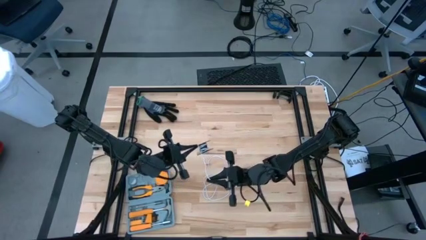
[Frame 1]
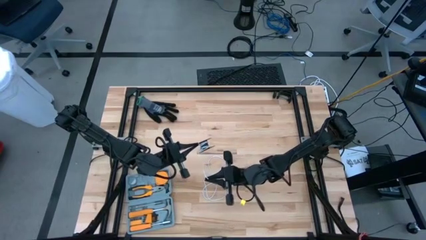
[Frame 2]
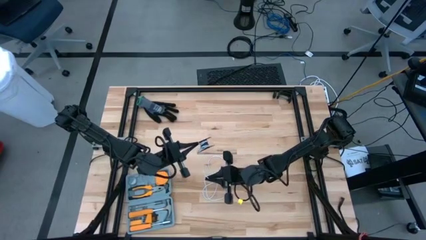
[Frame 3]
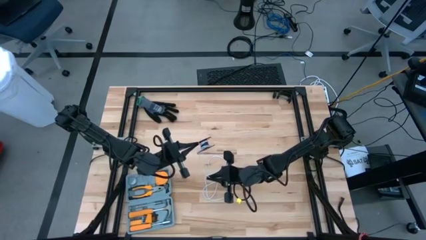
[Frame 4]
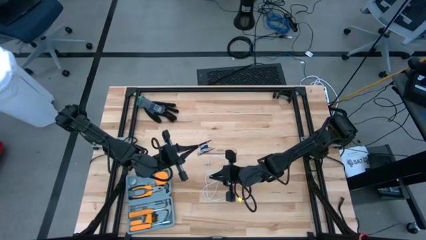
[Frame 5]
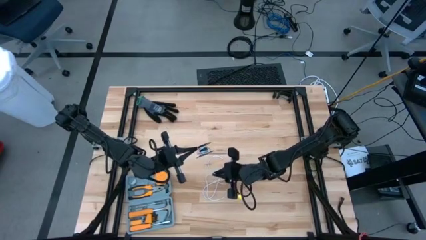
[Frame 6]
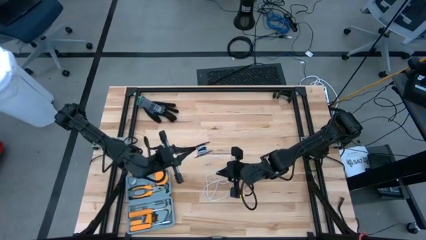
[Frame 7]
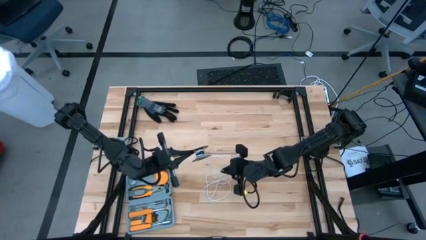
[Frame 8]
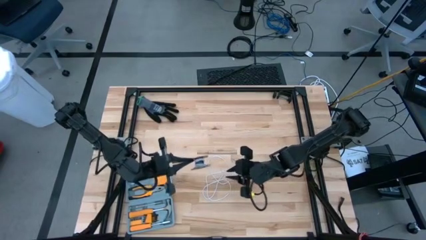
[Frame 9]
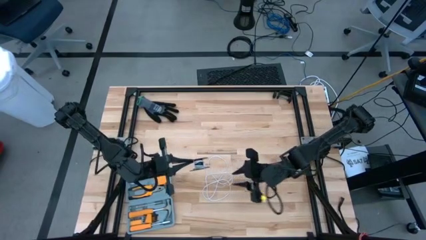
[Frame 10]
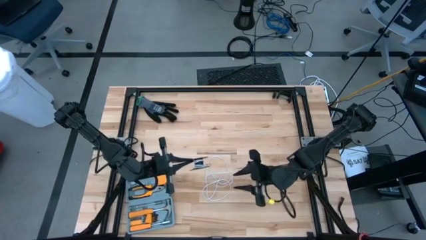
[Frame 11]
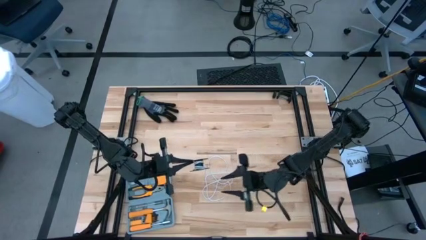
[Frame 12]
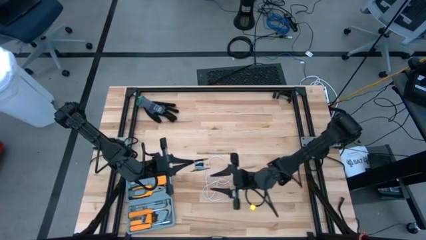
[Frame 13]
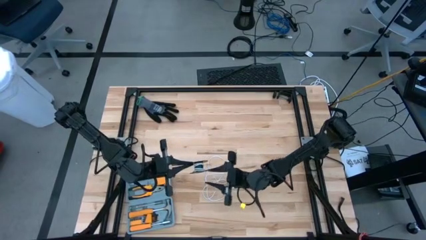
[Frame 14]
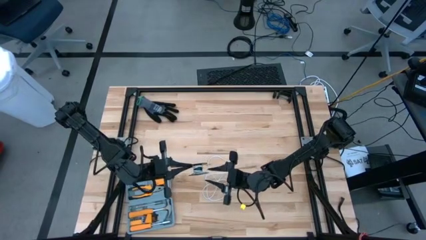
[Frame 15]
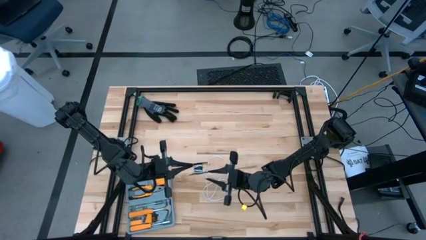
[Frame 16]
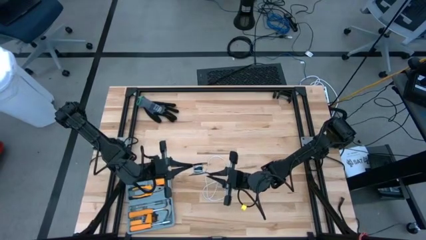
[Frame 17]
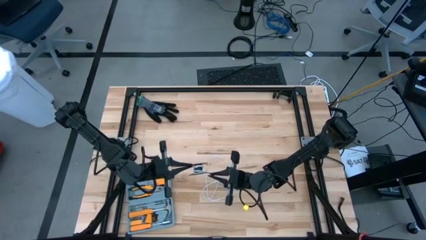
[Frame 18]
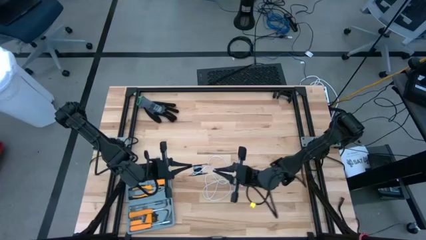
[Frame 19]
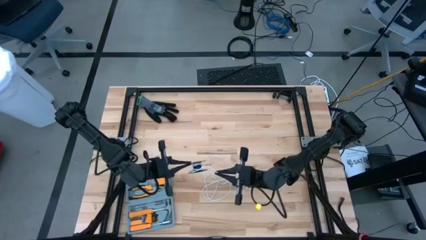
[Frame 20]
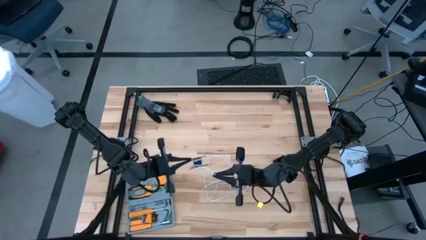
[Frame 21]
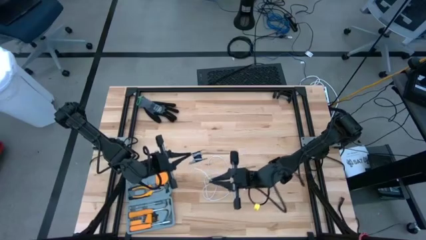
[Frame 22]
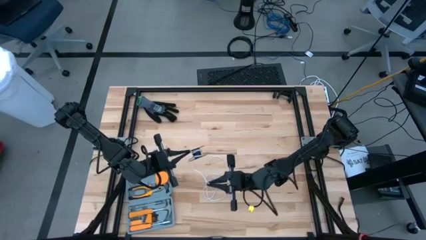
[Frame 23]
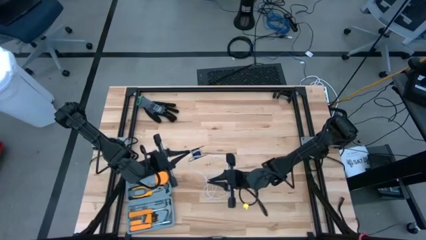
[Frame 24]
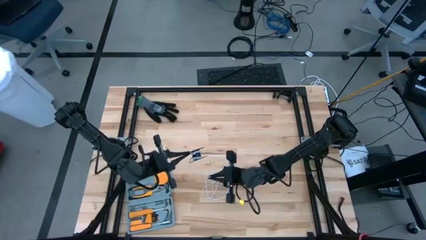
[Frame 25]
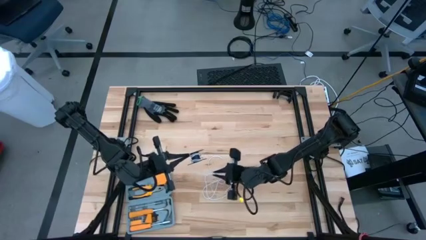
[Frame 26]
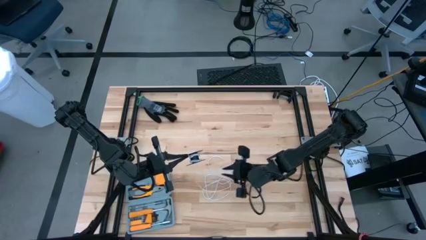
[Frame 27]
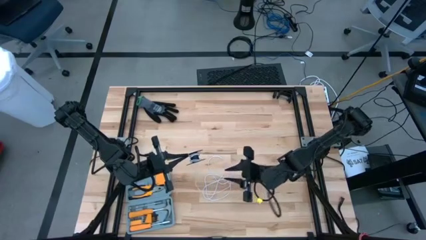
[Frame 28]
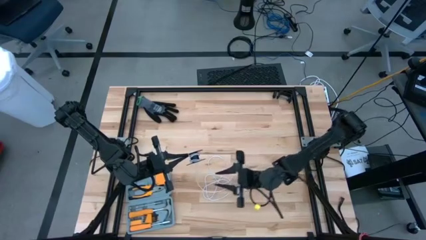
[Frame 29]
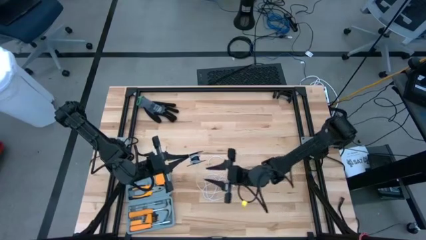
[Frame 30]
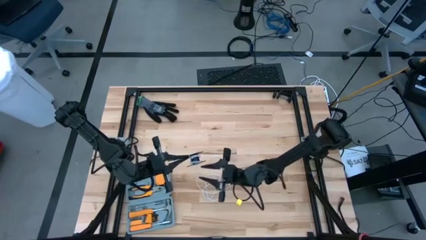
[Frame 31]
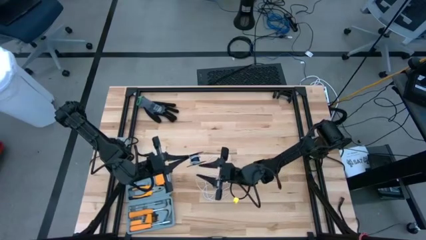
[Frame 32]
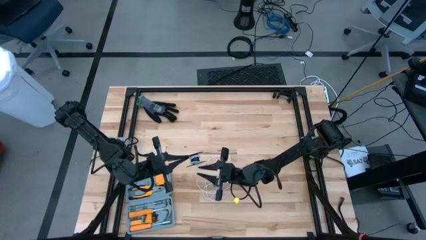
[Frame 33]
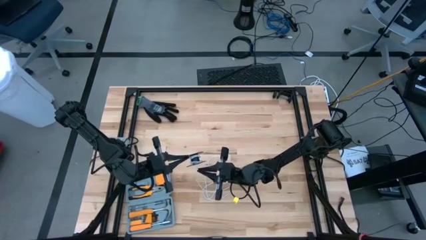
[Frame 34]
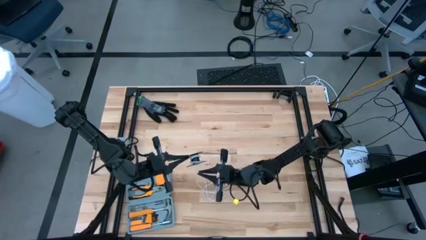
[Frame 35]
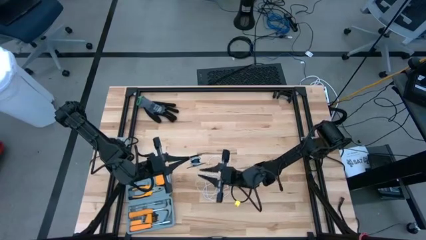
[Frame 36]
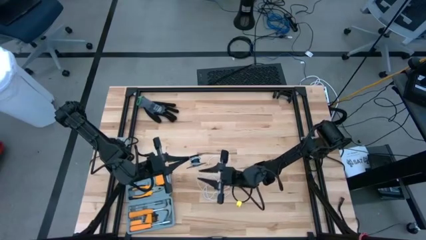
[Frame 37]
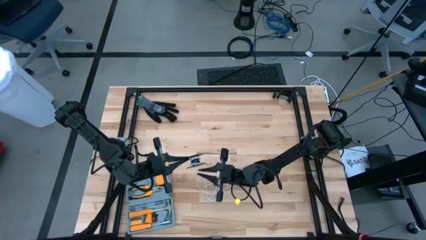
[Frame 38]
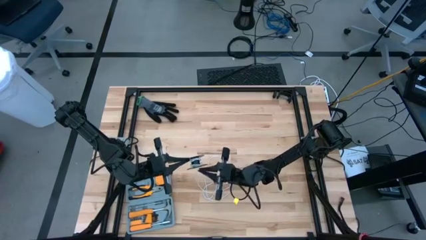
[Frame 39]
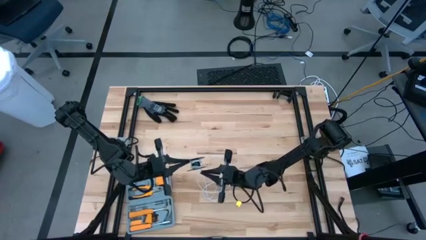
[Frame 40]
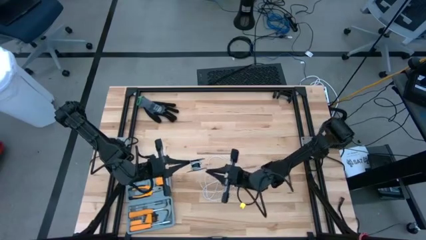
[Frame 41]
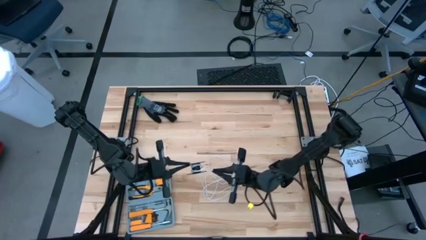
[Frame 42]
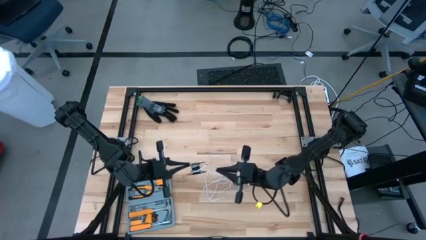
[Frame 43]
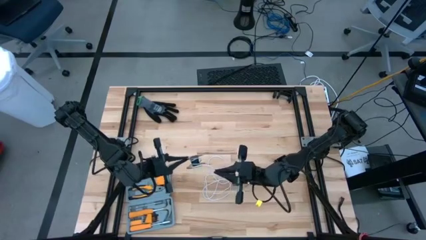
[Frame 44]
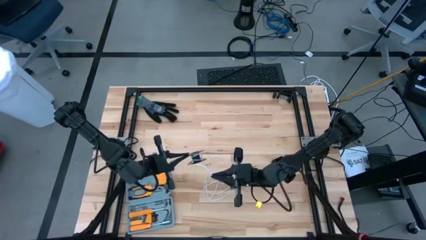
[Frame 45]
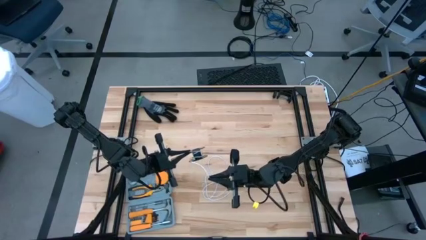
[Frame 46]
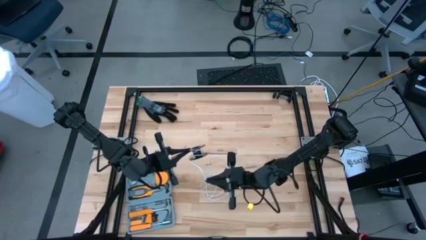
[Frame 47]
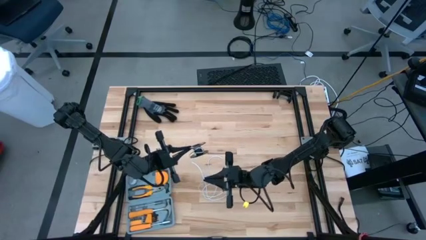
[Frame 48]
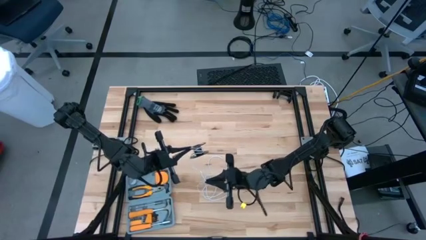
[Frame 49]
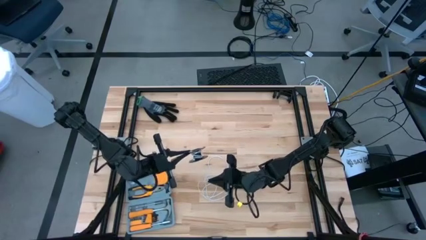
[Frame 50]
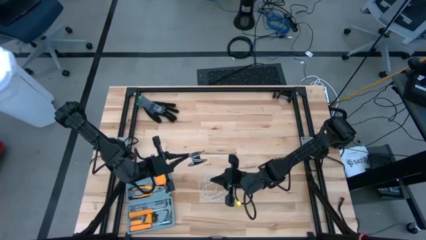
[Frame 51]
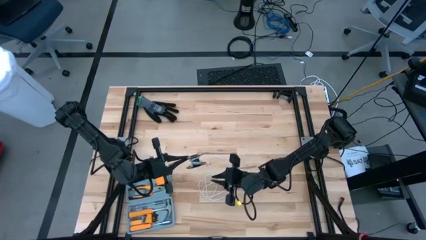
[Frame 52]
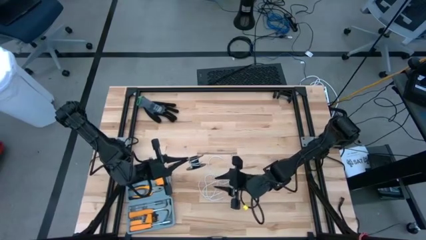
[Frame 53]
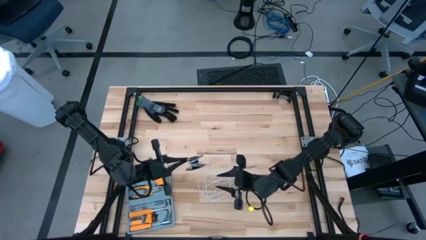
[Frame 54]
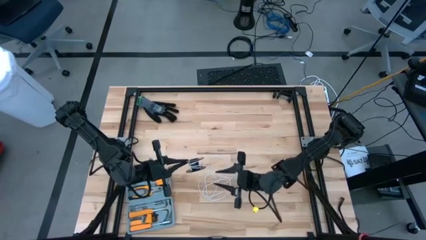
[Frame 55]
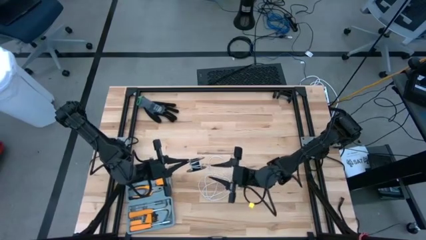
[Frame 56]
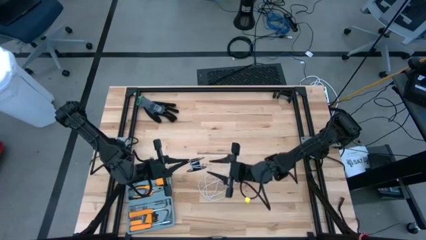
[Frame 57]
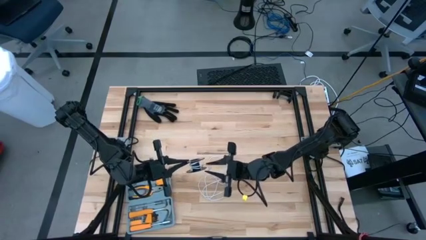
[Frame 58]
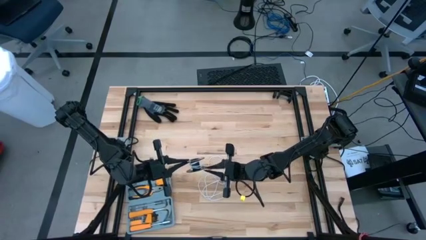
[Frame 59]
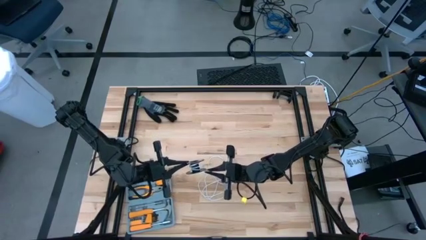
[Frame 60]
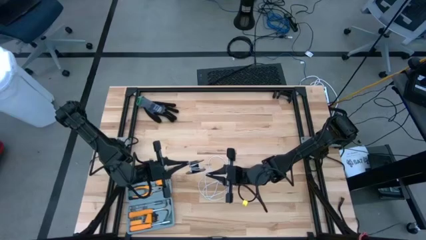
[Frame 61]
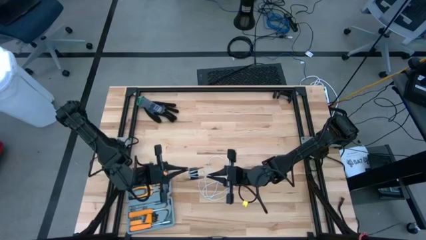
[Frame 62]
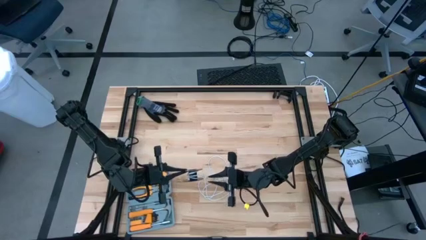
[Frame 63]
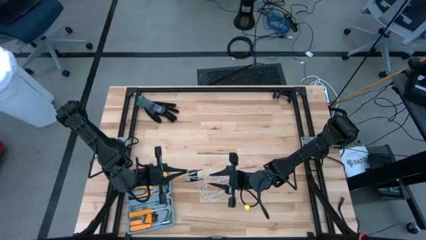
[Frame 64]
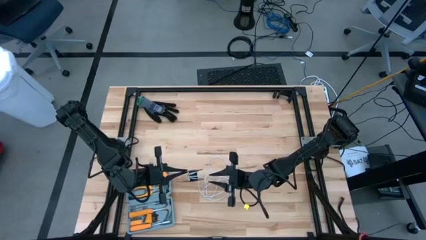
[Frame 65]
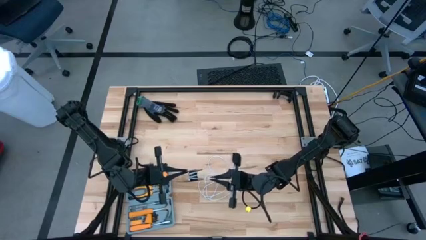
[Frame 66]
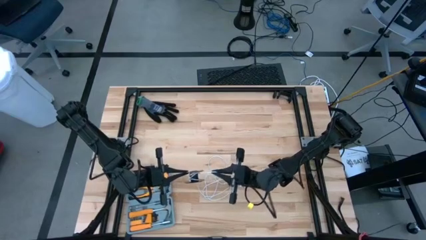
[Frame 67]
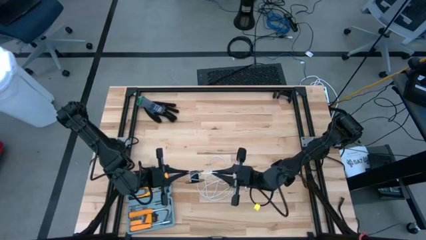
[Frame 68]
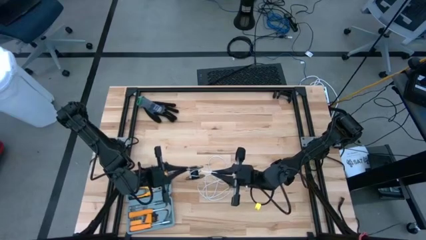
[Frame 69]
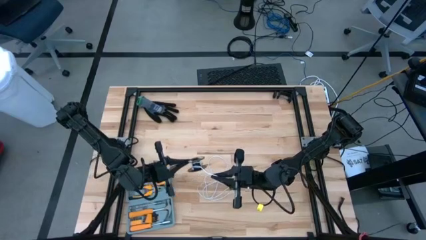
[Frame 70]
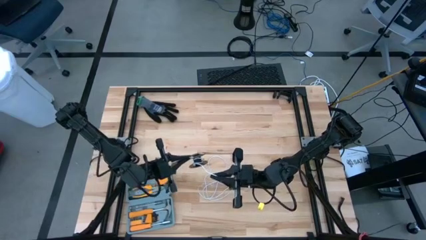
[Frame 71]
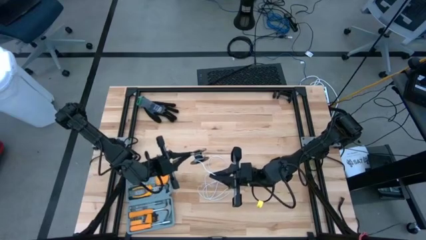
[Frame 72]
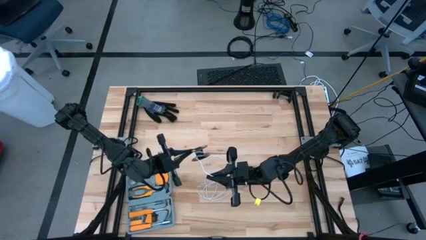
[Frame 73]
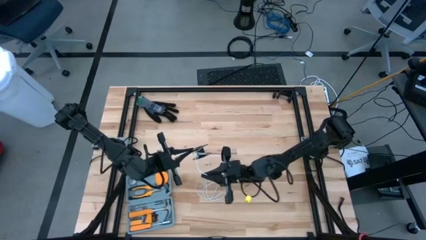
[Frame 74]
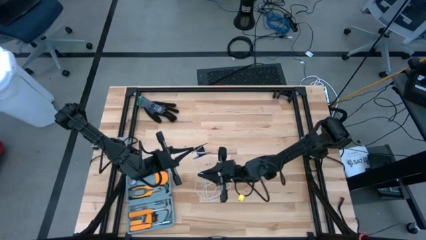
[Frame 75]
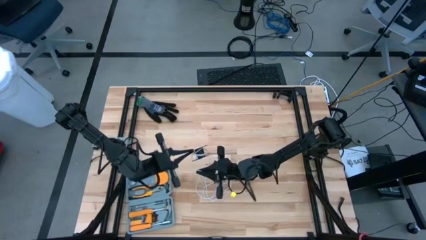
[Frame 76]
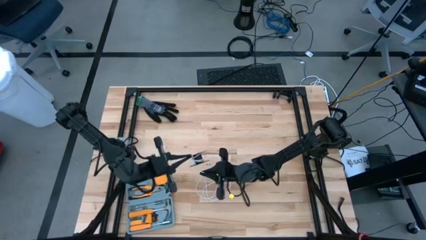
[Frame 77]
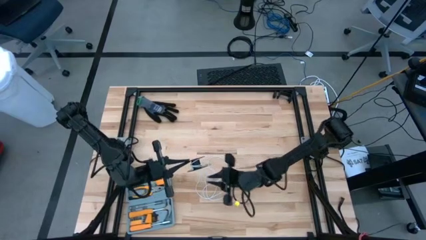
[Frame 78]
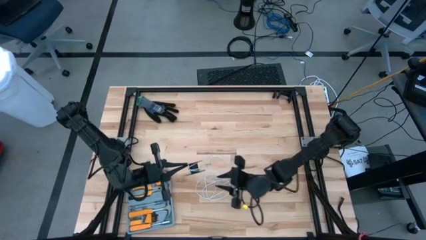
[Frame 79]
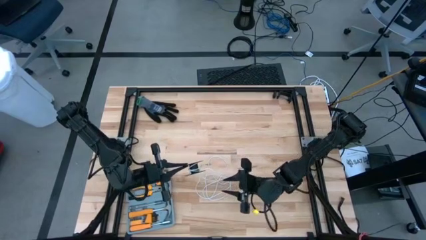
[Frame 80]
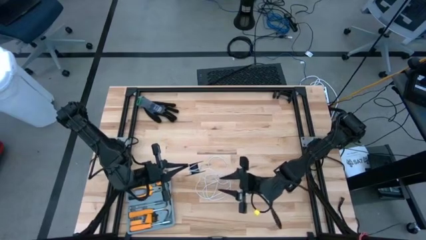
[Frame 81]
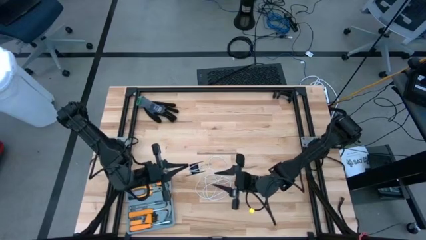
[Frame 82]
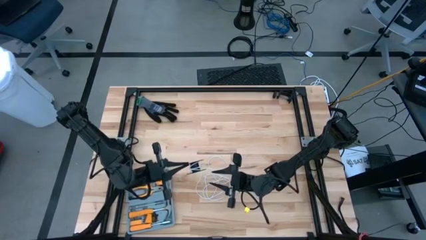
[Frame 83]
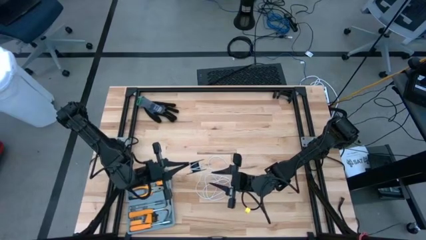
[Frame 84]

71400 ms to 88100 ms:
Task: Coil cords
Uncoil the white cable wire from the spool
